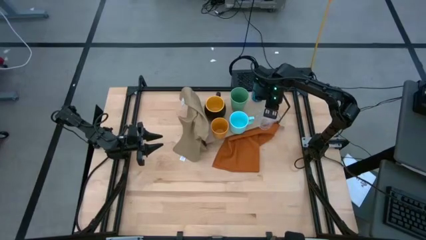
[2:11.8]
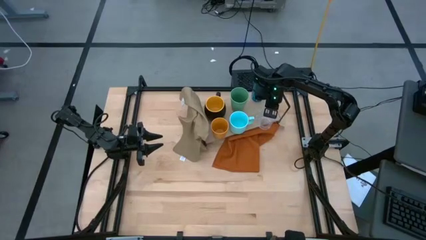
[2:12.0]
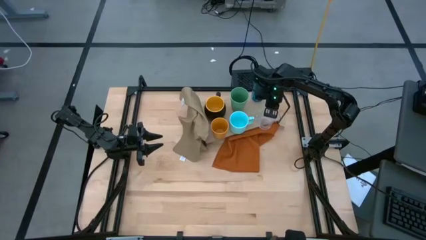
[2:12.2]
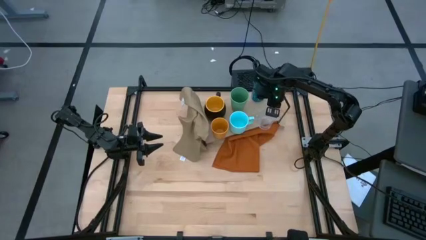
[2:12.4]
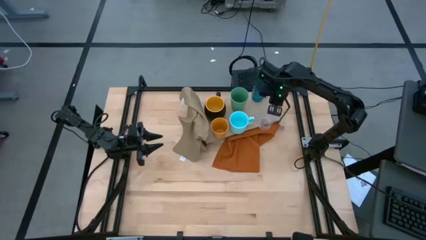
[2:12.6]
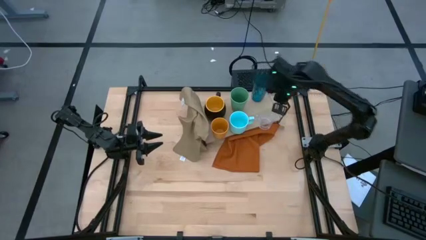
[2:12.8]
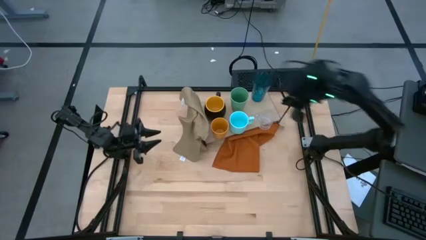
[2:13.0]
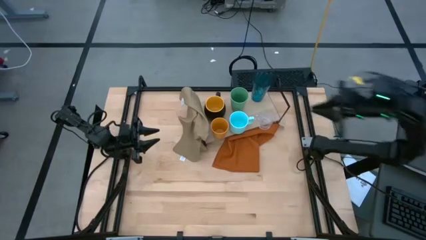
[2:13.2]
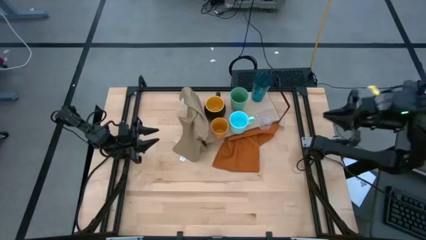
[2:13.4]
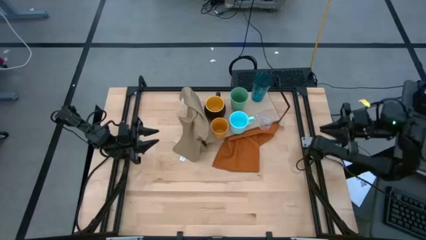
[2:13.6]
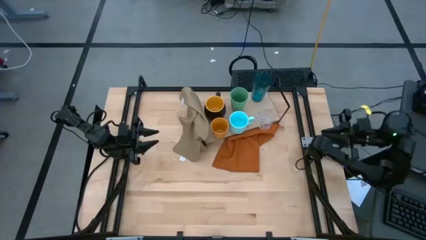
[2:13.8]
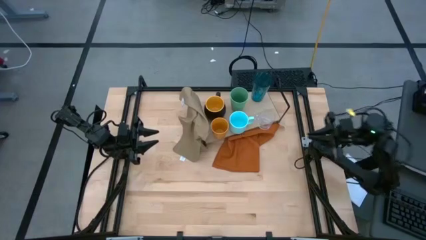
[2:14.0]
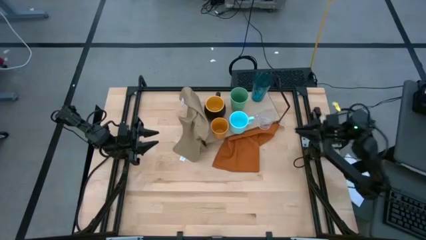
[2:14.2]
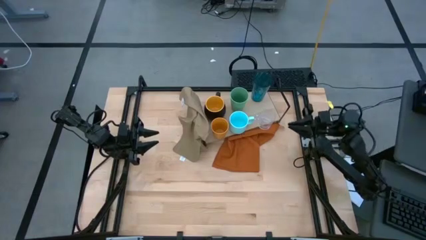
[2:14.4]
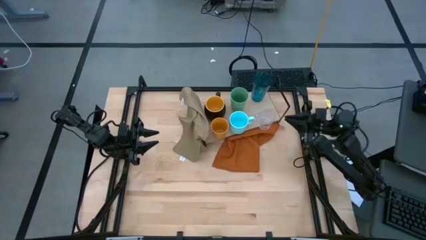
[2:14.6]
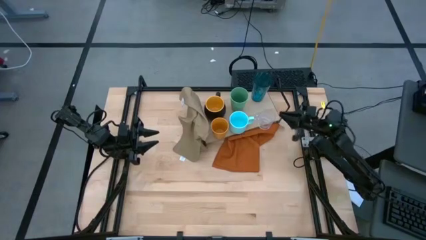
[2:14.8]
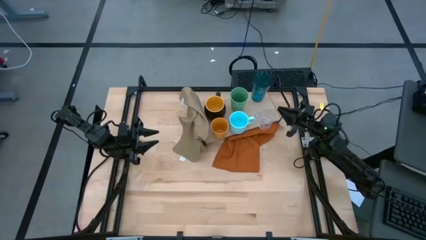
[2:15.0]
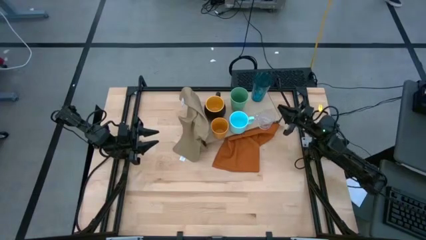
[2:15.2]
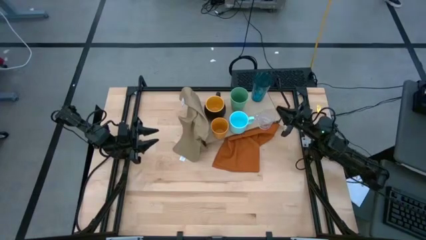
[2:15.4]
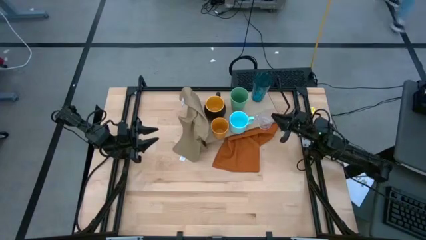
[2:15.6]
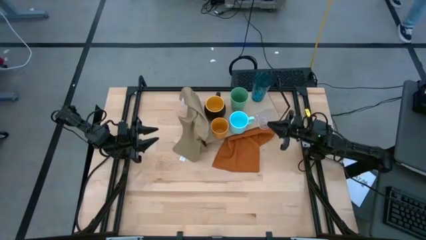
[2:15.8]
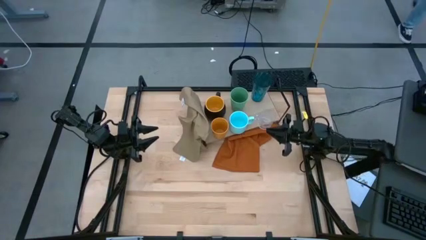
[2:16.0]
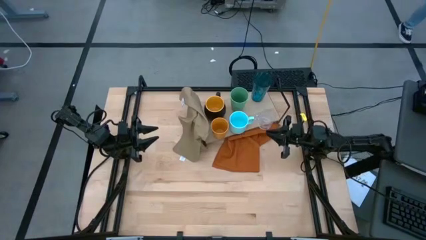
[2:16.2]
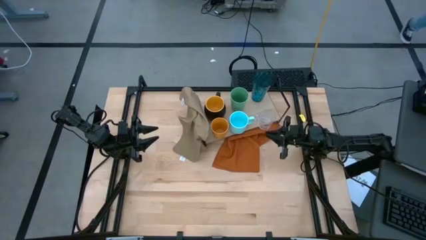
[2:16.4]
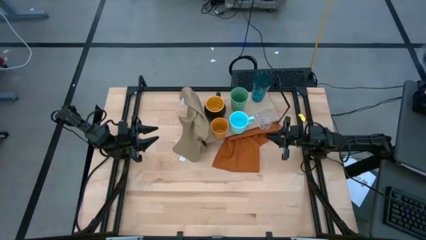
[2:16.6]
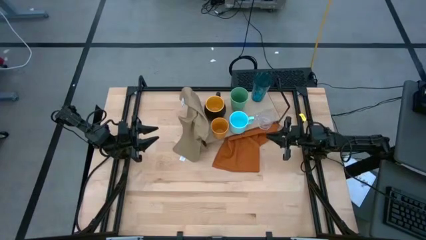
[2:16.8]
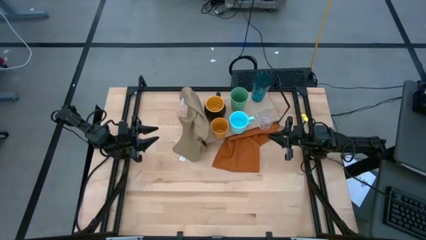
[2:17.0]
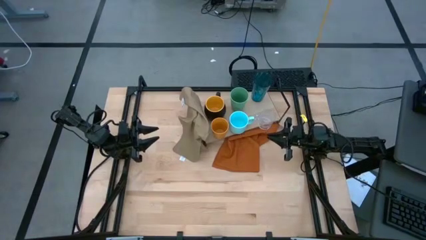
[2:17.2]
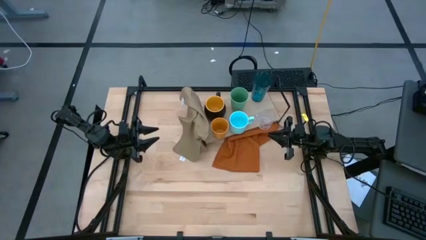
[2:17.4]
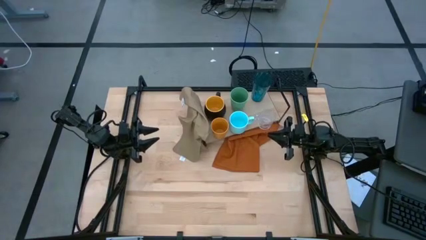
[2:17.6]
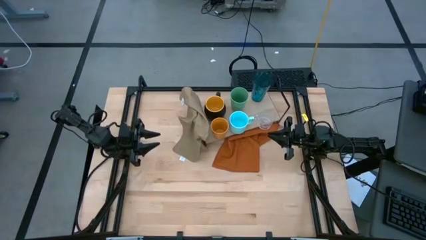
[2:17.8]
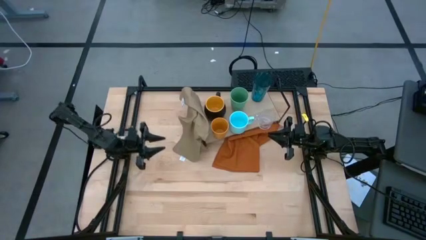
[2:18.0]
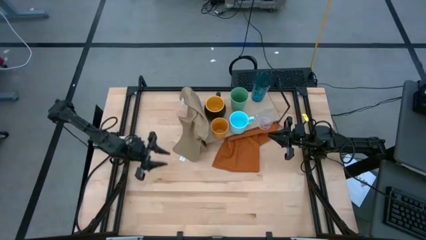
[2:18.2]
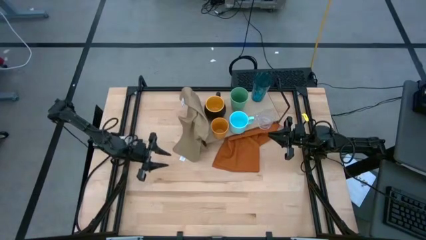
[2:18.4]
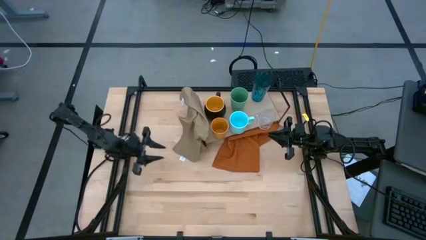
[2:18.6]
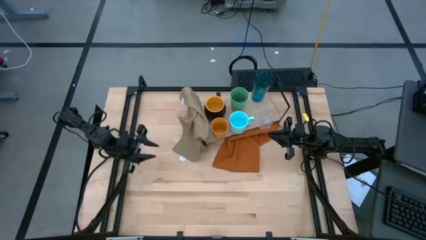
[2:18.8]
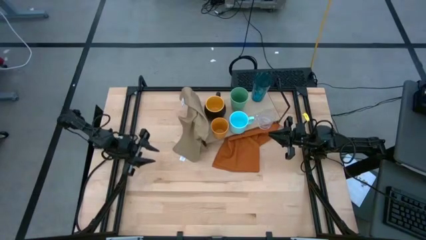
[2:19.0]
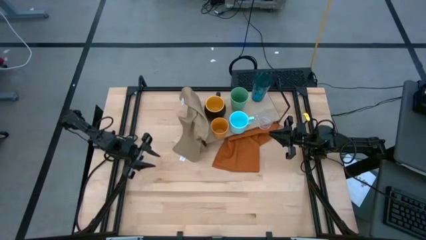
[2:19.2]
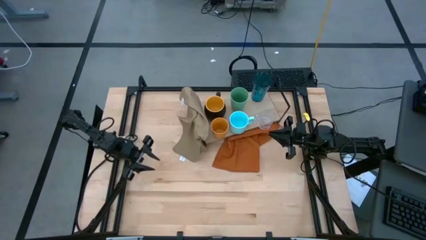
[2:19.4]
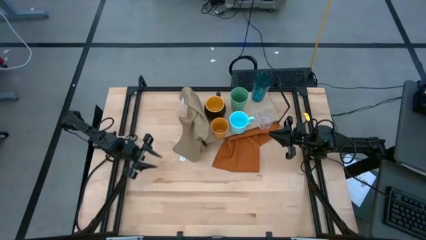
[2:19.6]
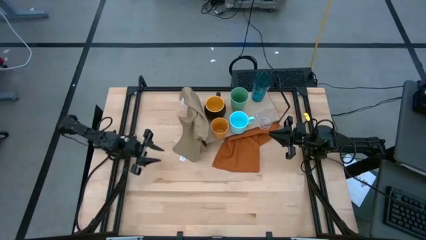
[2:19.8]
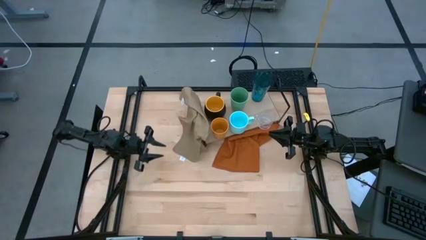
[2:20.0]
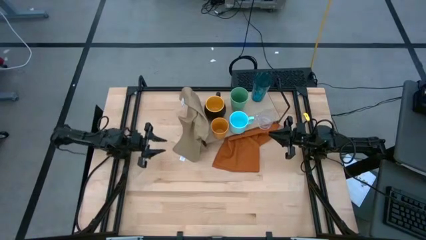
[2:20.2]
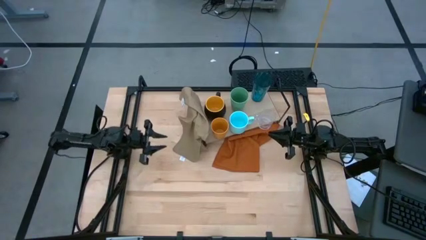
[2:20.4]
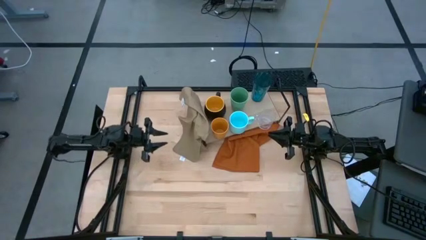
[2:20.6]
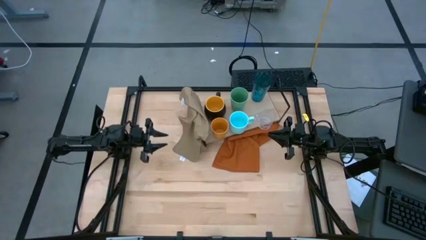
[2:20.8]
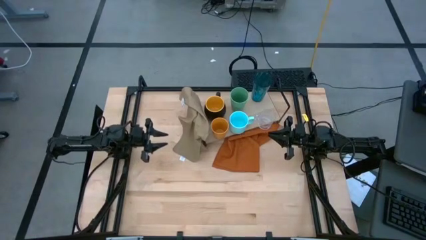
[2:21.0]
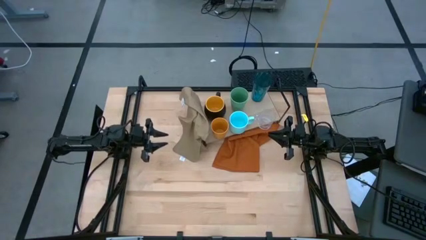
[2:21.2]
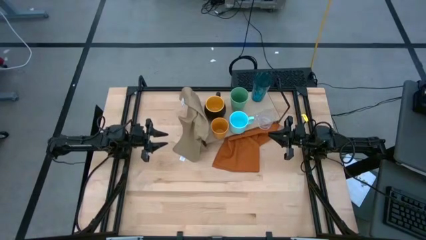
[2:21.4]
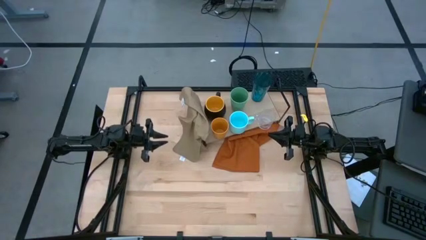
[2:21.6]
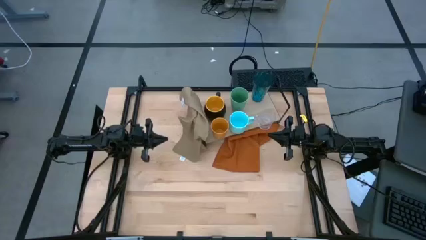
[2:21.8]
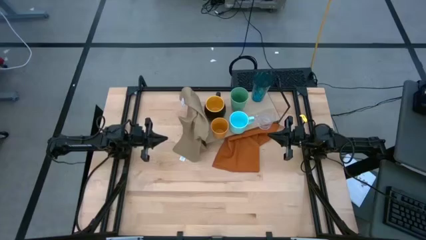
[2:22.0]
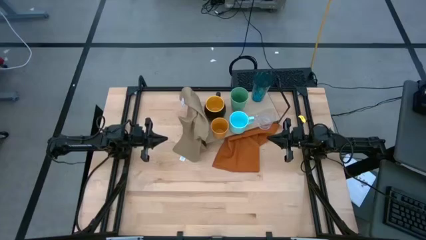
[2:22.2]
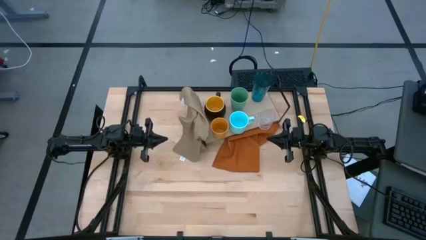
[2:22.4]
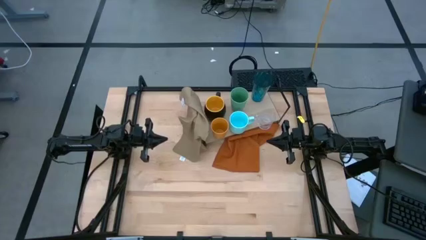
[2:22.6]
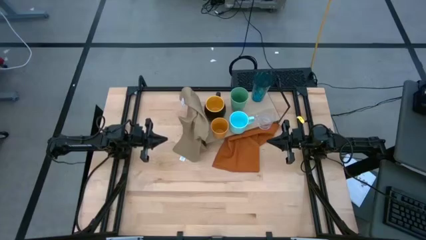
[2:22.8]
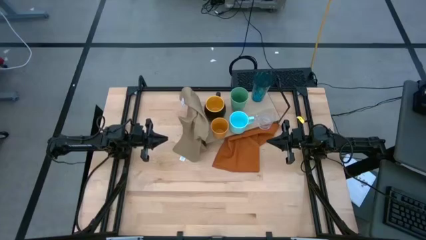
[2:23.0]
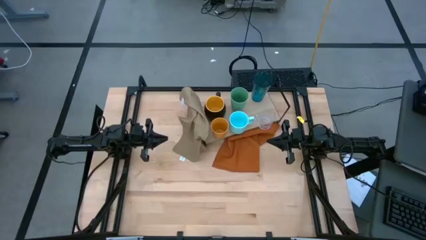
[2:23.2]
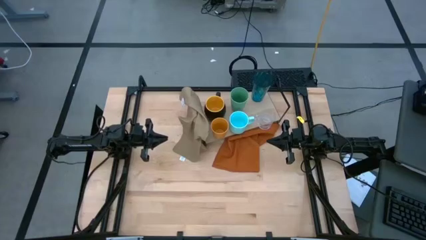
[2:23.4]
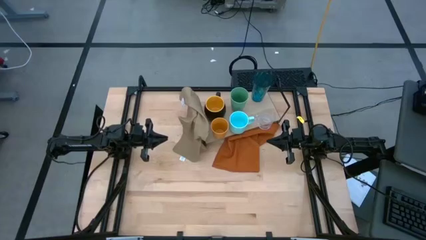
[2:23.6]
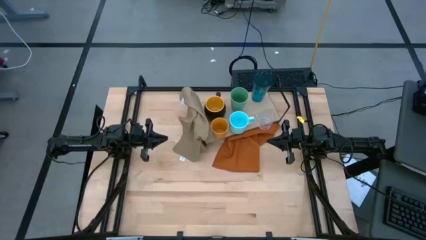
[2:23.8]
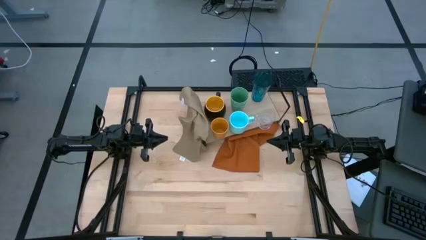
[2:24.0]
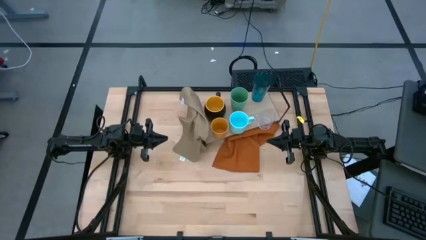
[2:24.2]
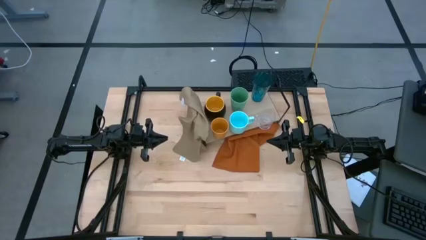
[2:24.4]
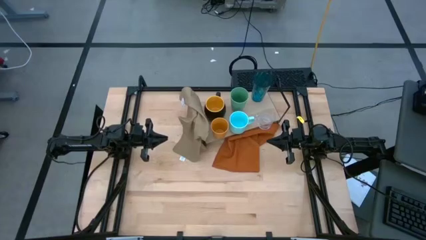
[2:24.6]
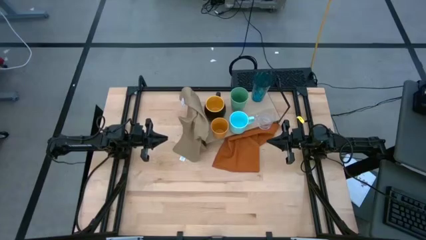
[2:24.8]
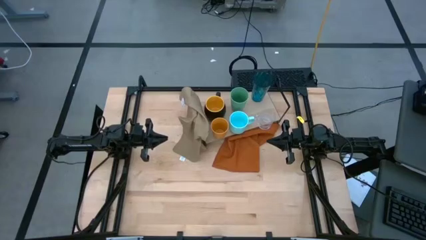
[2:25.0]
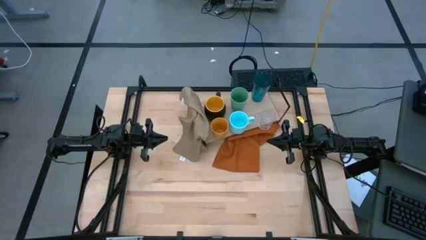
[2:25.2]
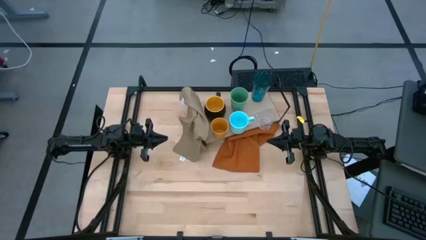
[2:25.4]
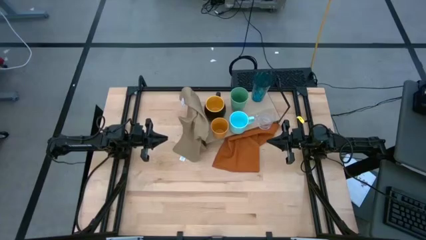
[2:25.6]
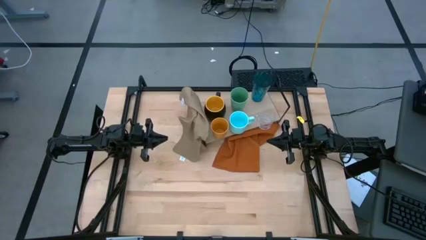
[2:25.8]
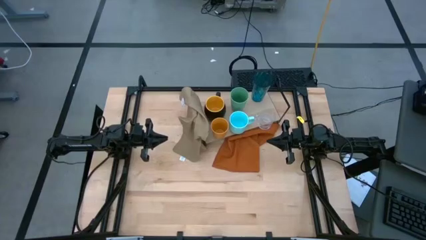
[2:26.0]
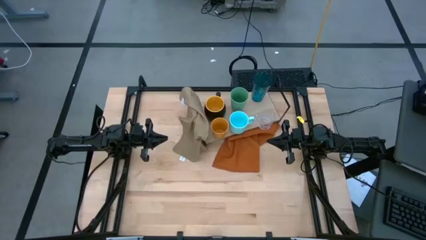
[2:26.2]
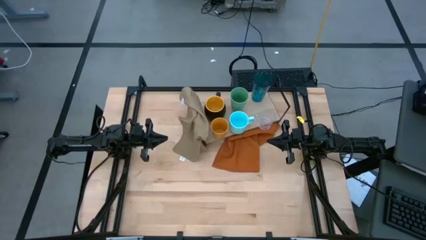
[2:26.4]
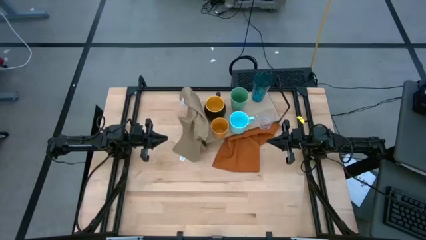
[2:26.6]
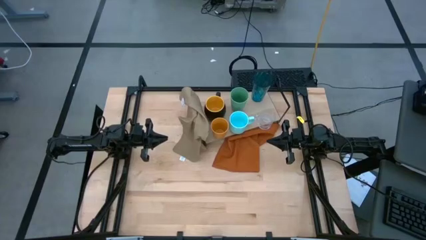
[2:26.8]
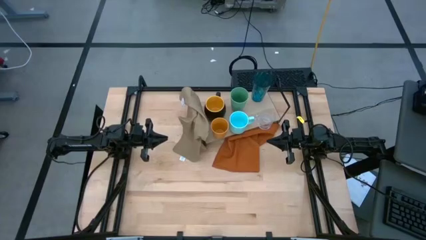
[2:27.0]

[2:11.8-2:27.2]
Task: Stack small to large cups/mugs on shelf
Return to Home Position
